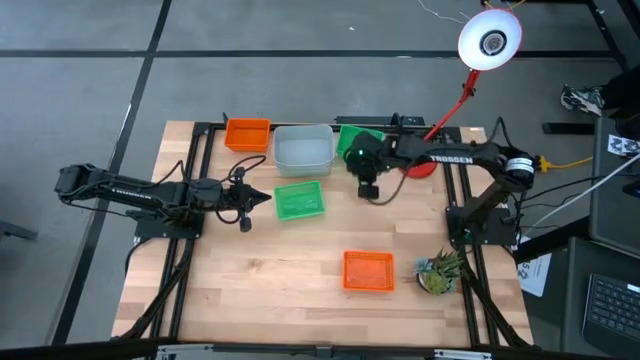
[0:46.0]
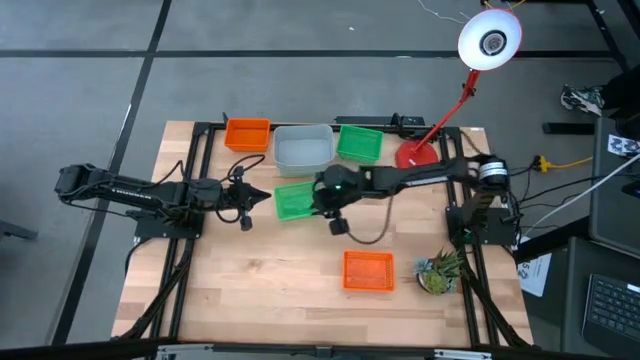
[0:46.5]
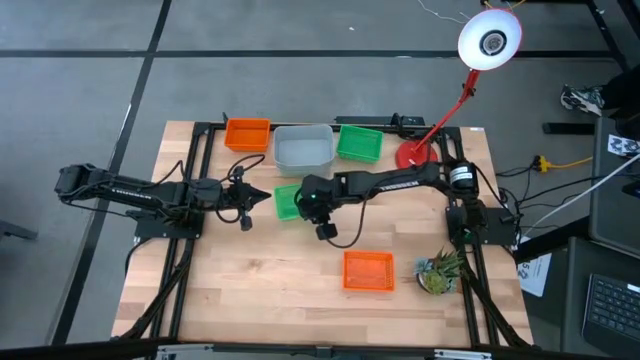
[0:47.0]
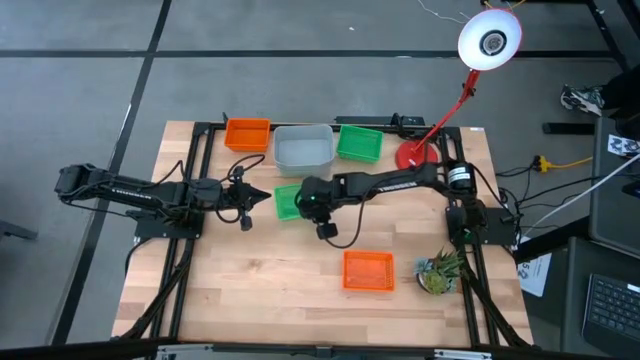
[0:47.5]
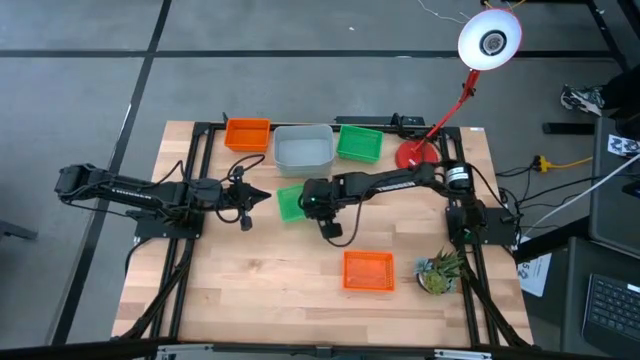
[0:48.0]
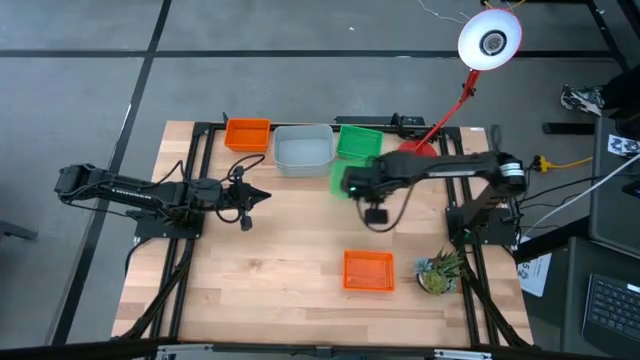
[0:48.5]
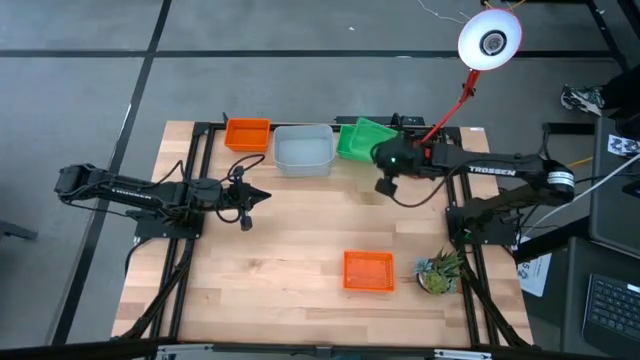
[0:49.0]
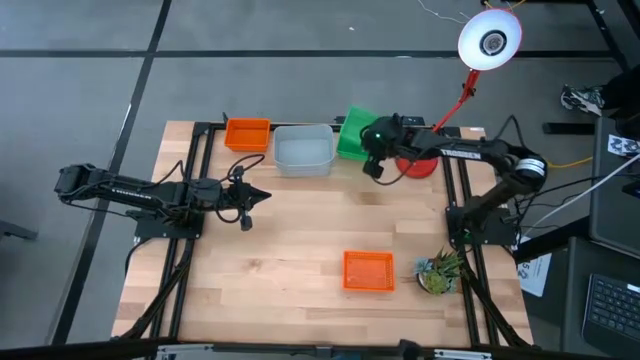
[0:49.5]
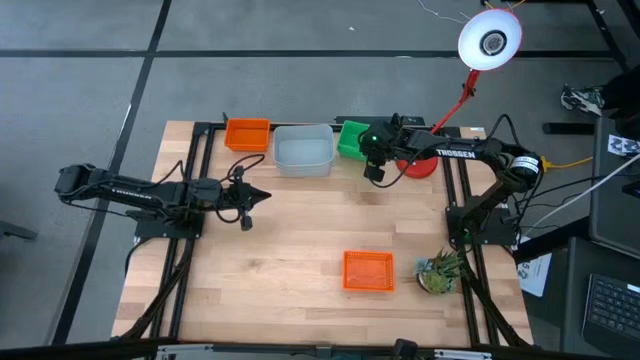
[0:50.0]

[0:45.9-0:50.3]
Stack the green bin on the top green bins

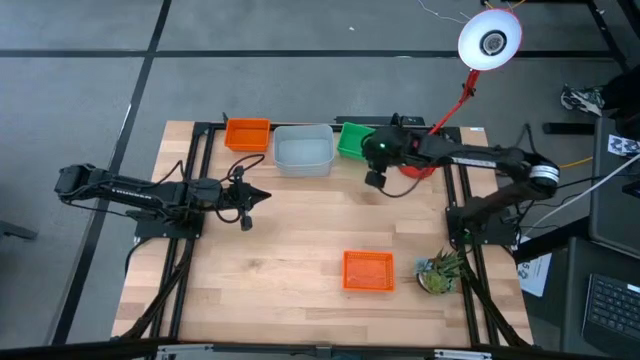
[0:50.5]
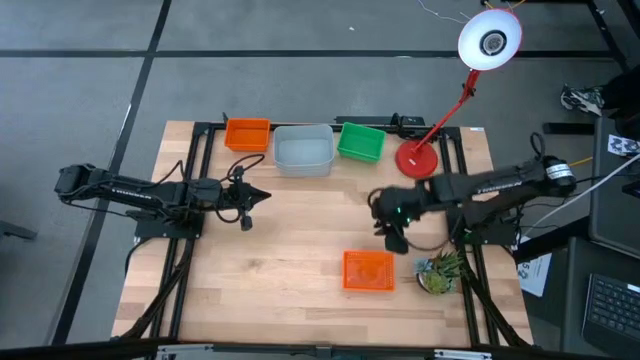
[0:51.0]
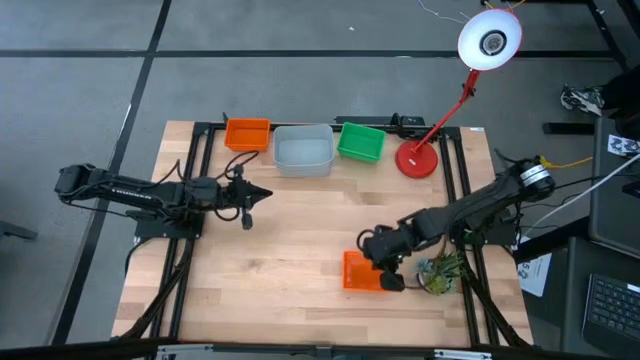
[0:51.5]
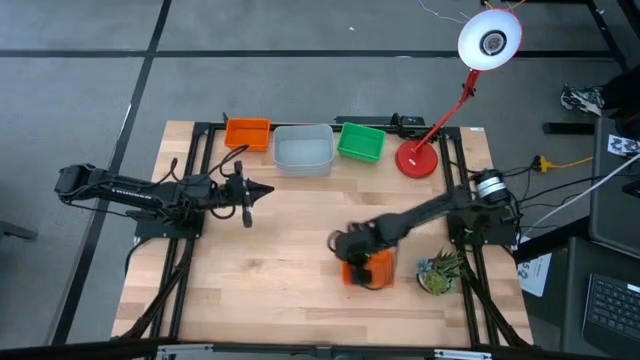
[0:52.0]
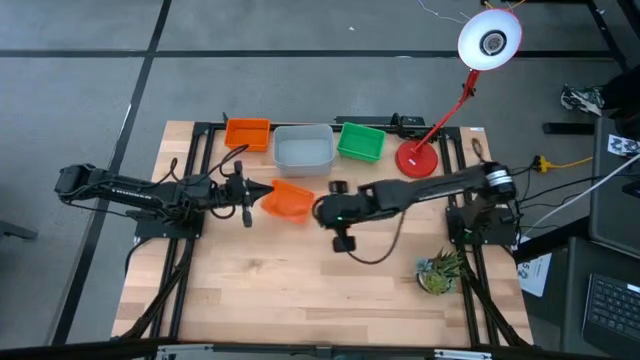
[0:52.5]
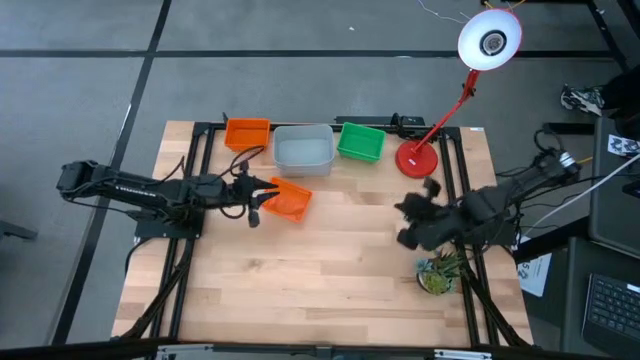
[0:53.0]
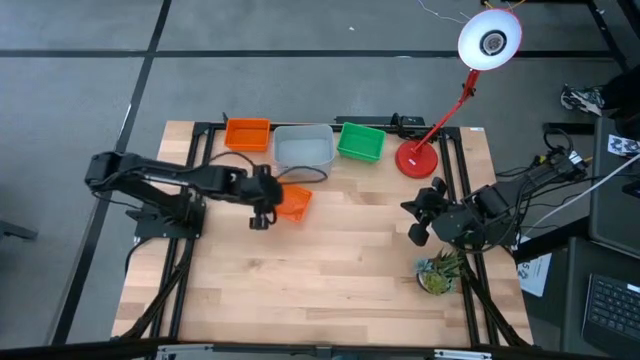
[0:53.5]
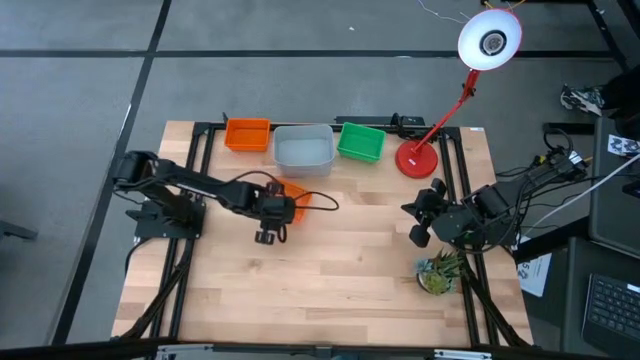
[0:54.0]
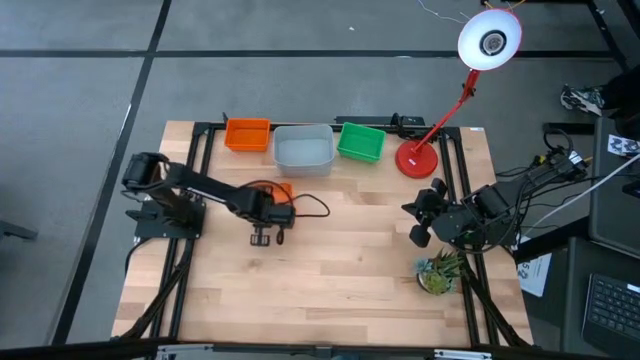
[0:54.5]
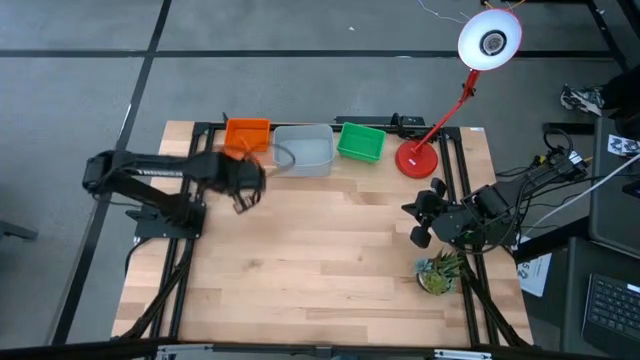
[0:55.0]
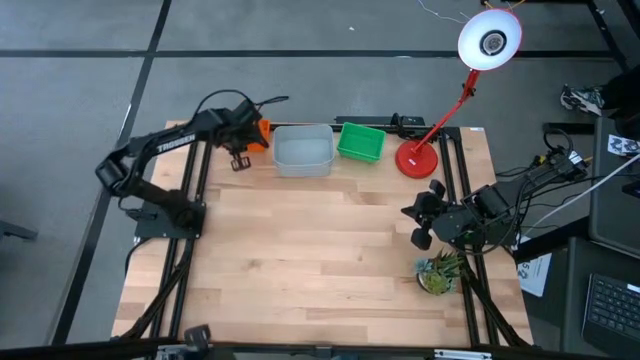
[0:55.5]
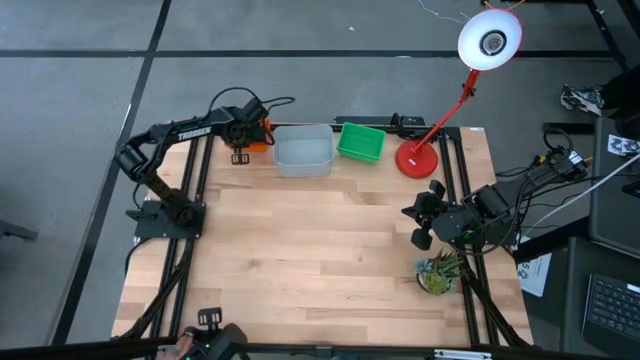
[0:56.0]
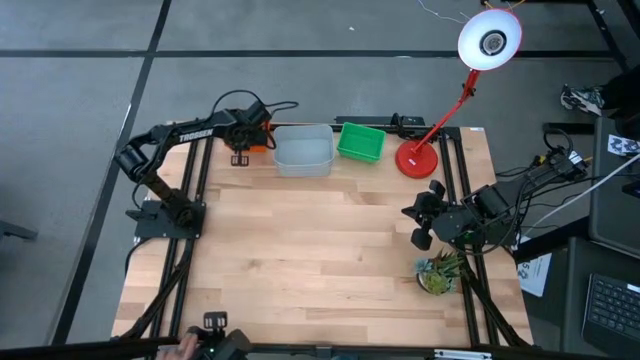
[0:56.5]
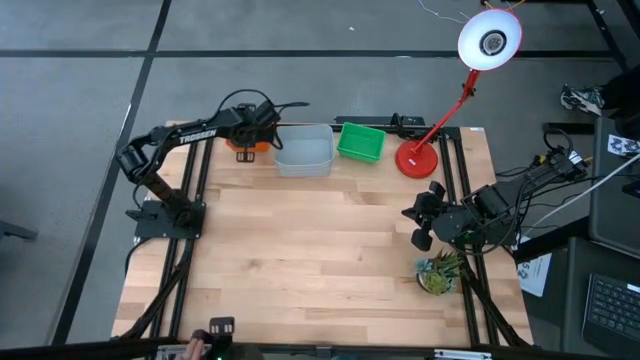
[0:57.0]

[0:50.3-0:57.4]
Stack the bottom right orange bin on the orange bins

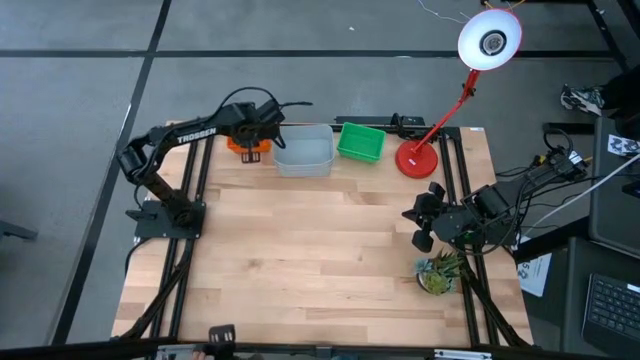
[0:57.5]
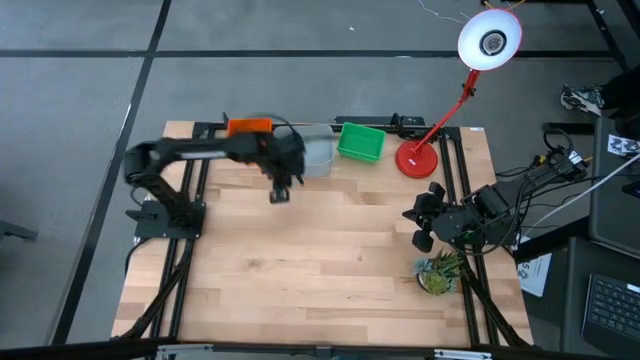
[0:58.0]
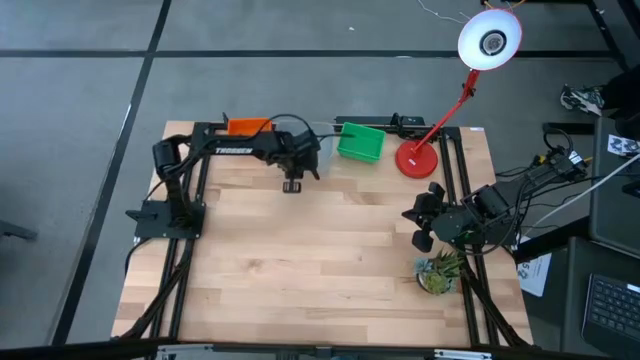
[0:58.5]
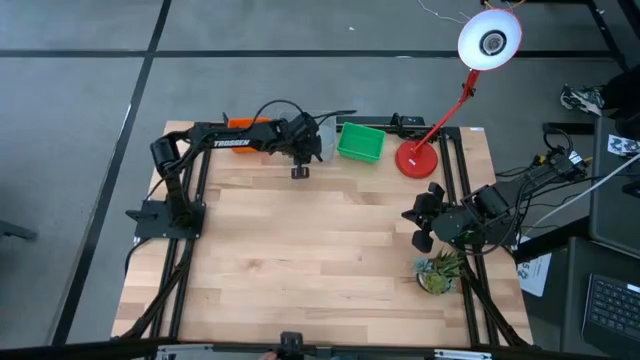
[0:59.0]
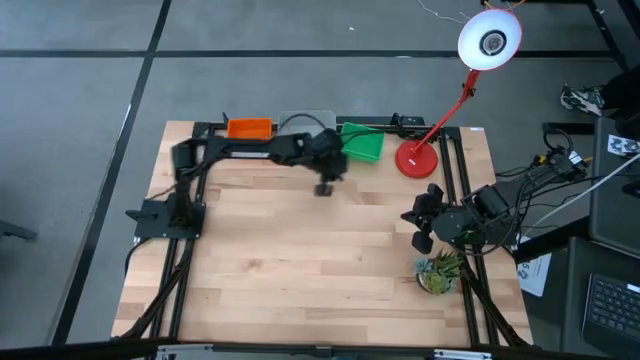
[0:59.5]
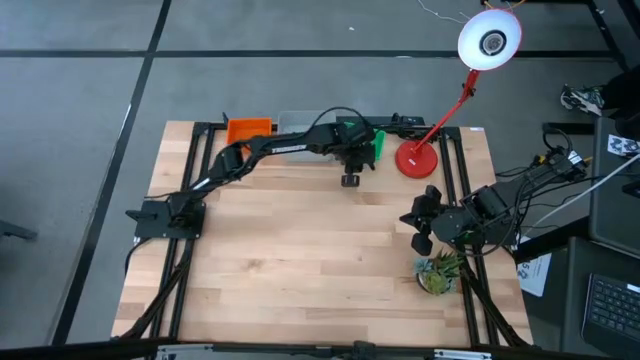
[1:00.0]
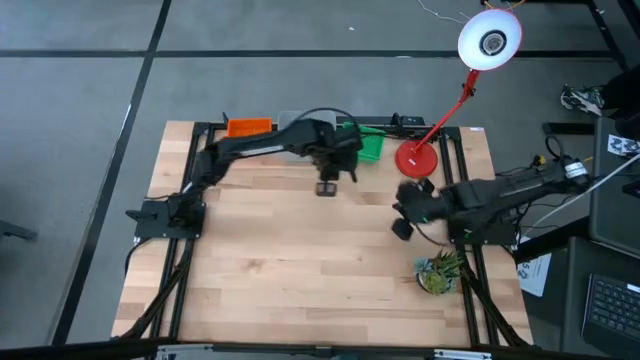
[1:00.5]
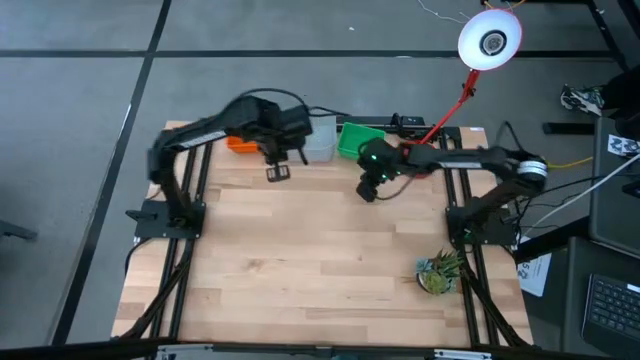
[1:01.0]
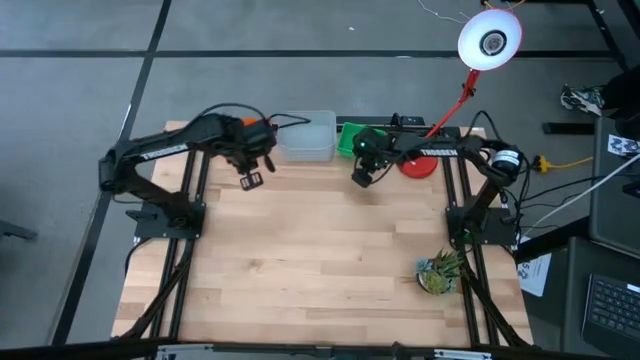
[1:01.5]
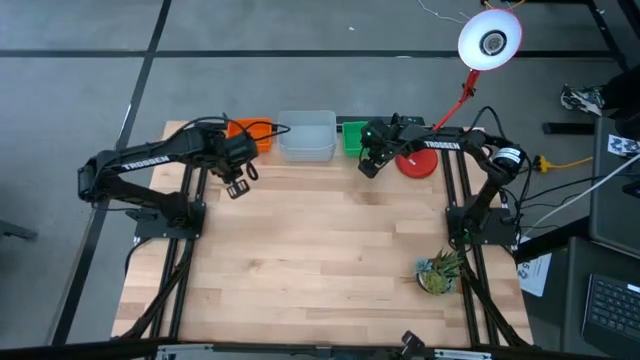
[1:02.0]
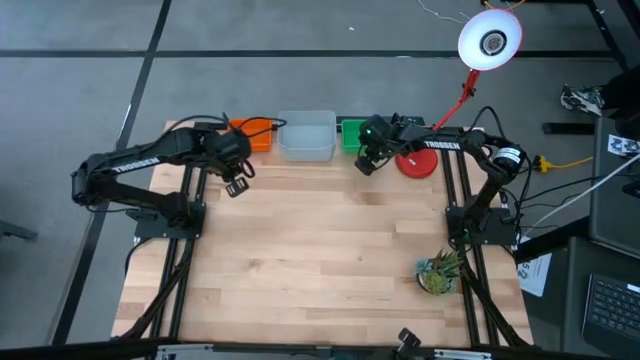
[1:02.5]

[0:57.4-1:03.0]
Adjust the bins

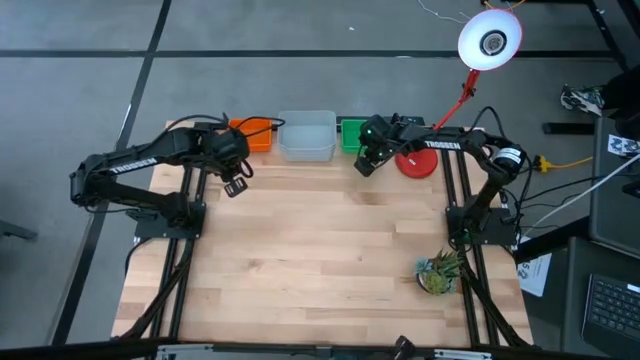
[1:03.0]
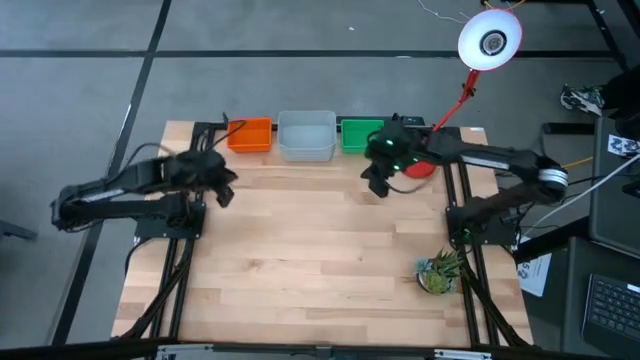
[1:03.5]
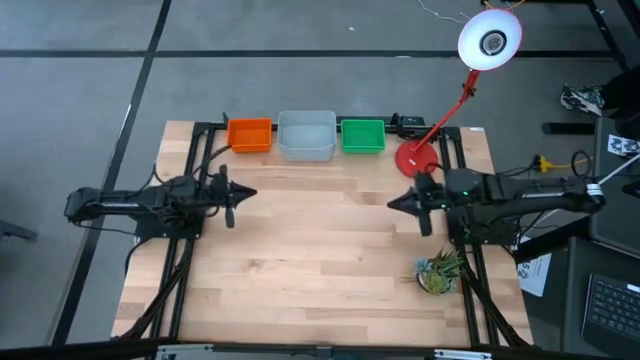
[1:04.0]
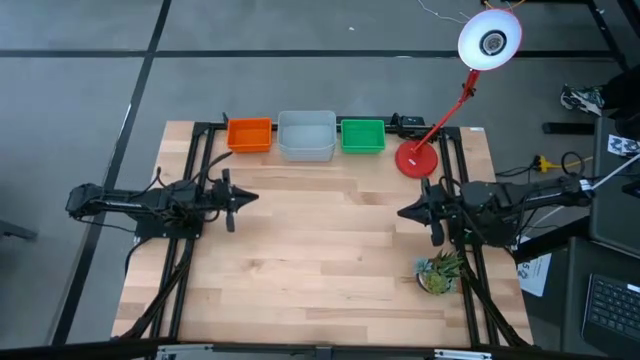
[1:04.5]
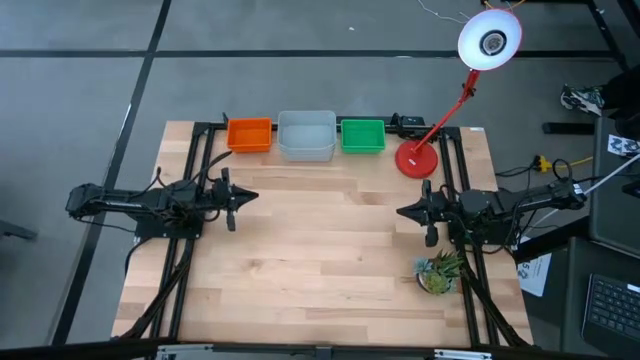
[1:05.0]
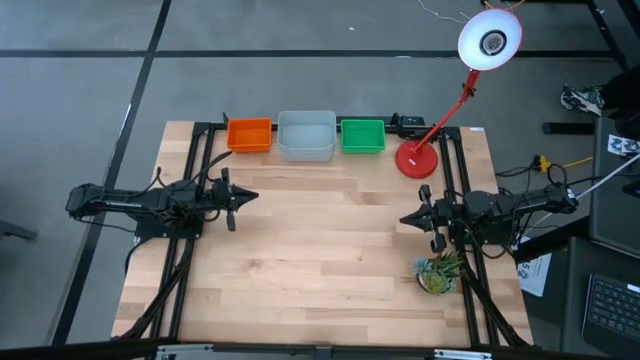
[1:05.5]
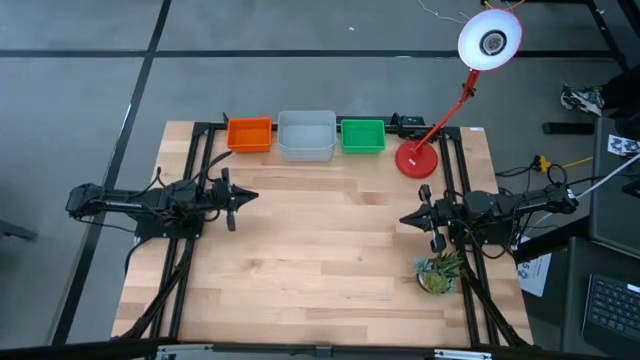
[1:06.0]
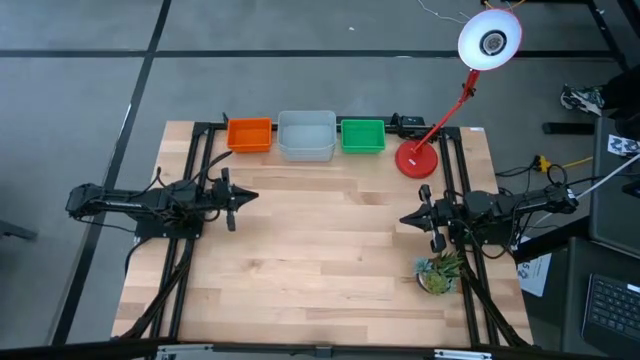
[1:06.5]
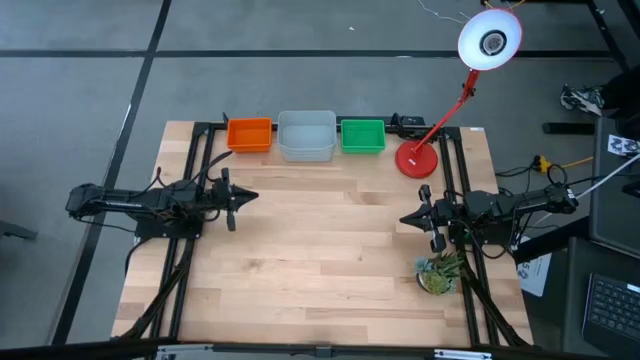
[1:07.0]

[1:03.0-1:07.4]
Return to home position
